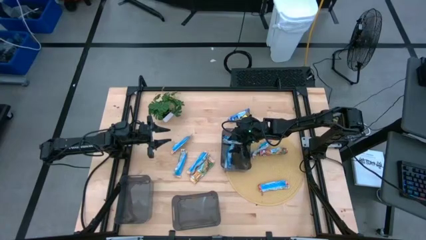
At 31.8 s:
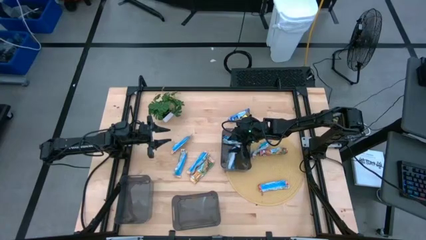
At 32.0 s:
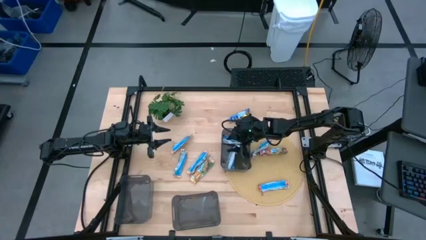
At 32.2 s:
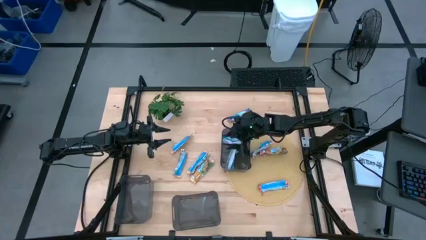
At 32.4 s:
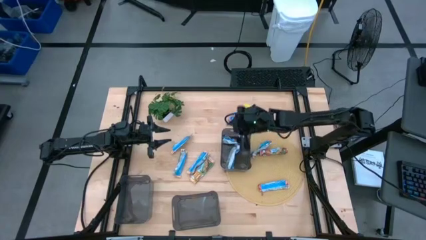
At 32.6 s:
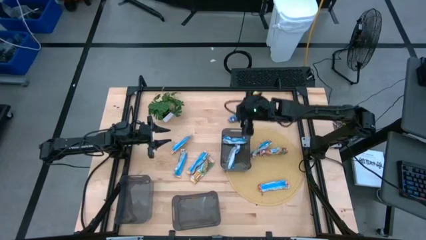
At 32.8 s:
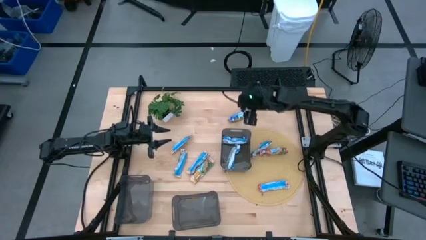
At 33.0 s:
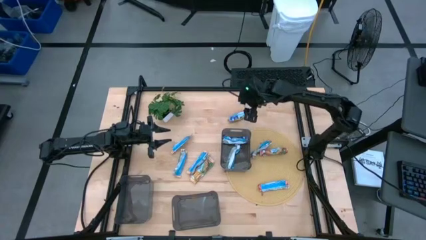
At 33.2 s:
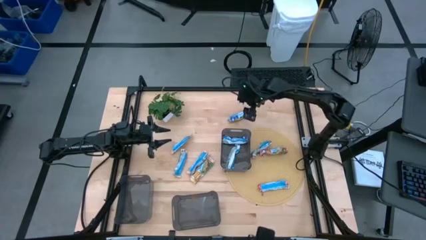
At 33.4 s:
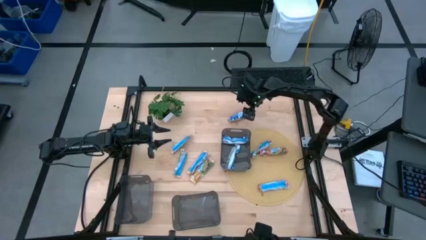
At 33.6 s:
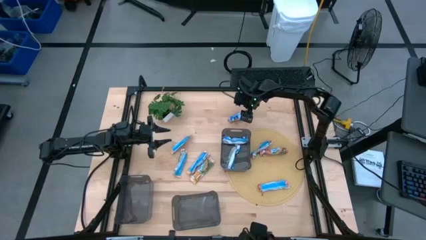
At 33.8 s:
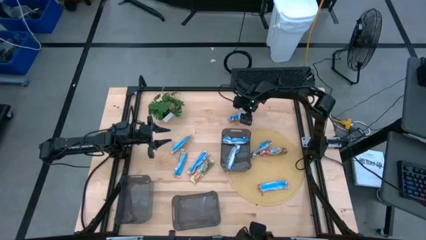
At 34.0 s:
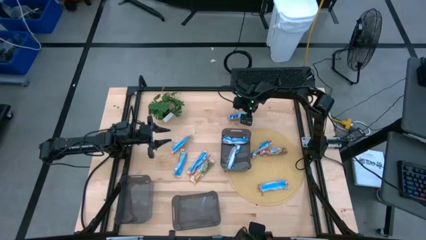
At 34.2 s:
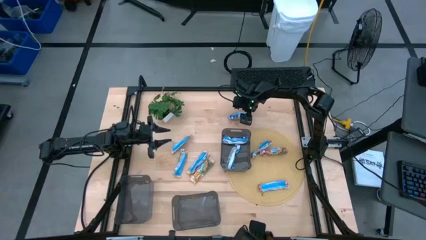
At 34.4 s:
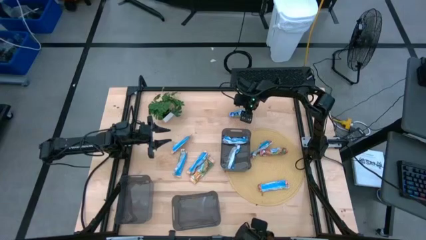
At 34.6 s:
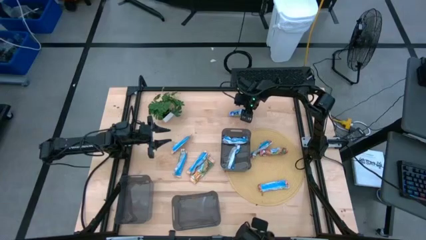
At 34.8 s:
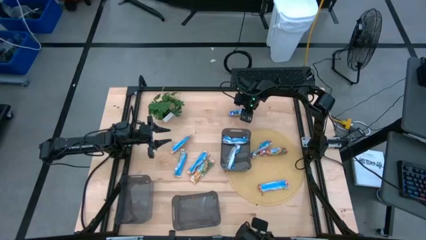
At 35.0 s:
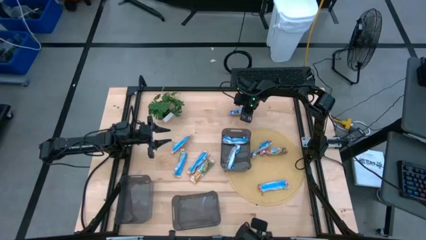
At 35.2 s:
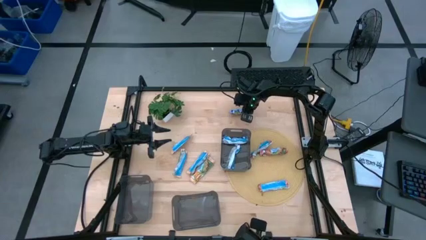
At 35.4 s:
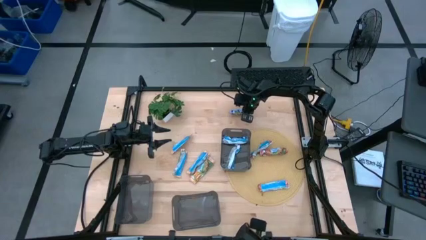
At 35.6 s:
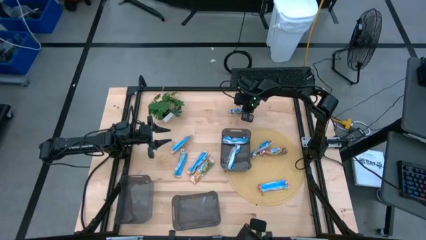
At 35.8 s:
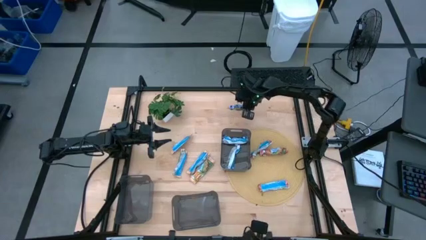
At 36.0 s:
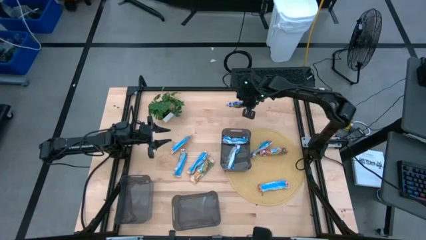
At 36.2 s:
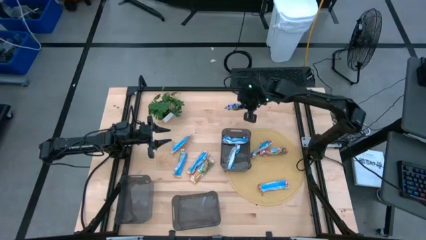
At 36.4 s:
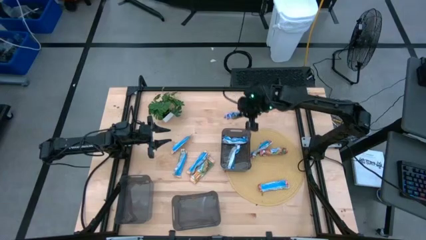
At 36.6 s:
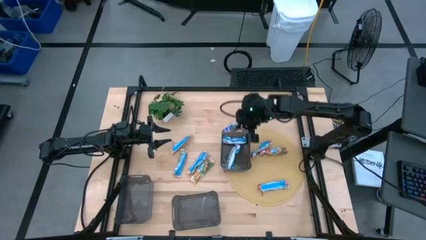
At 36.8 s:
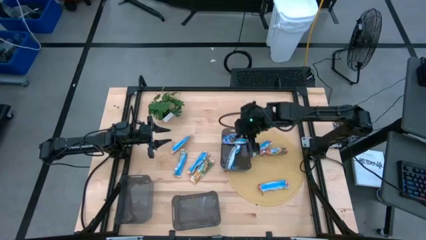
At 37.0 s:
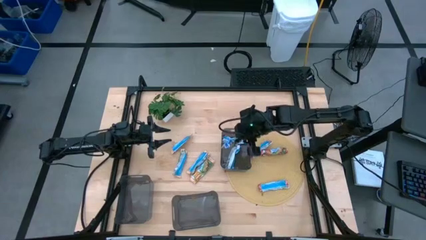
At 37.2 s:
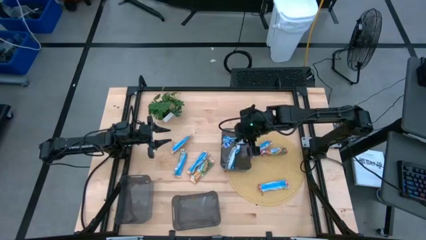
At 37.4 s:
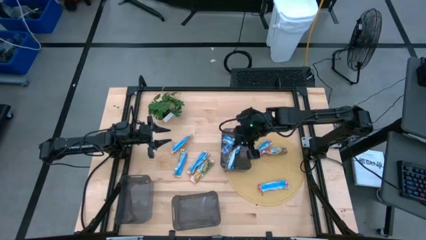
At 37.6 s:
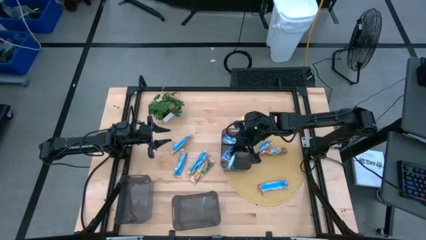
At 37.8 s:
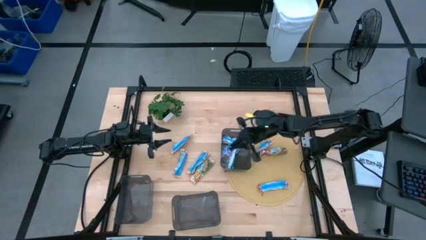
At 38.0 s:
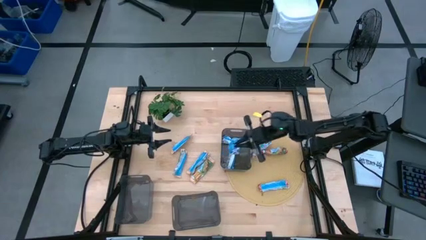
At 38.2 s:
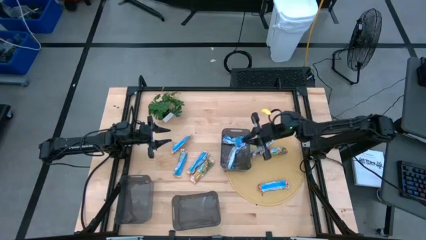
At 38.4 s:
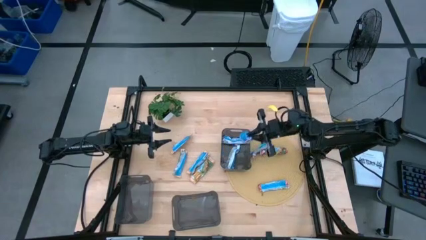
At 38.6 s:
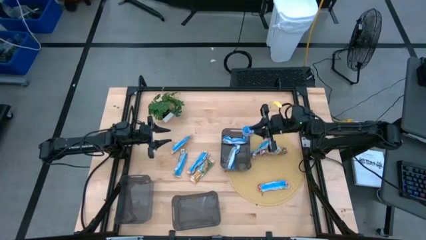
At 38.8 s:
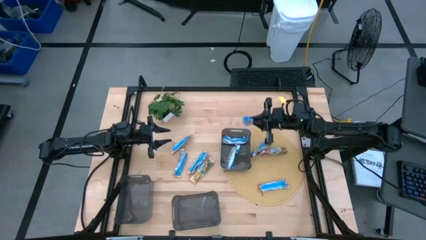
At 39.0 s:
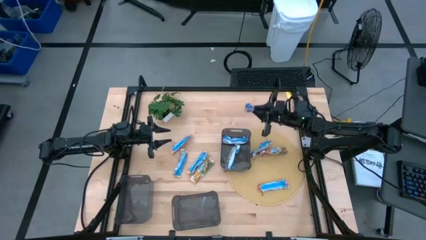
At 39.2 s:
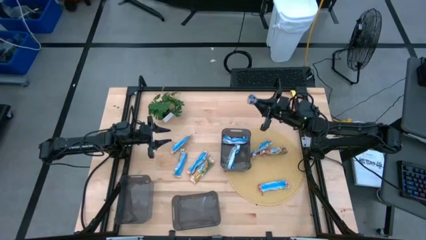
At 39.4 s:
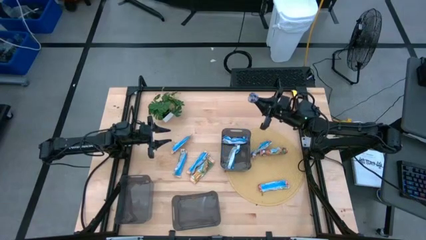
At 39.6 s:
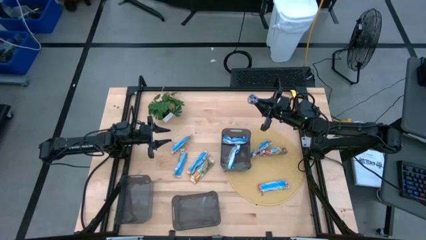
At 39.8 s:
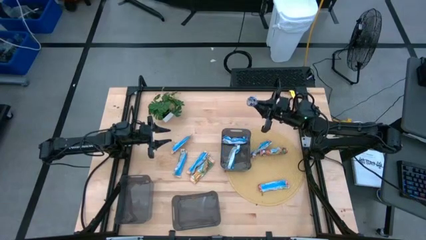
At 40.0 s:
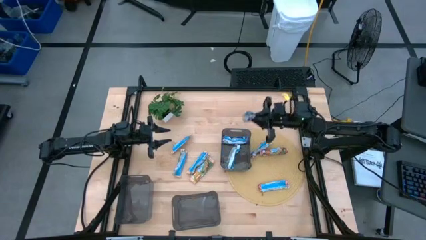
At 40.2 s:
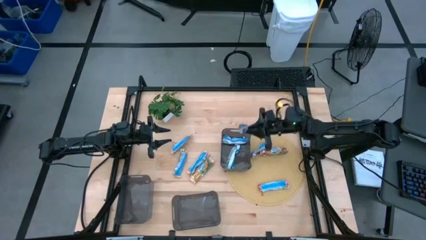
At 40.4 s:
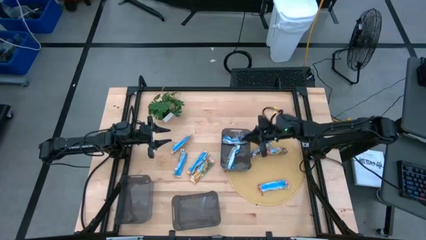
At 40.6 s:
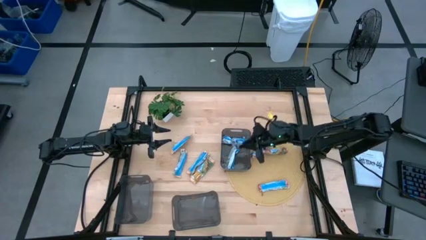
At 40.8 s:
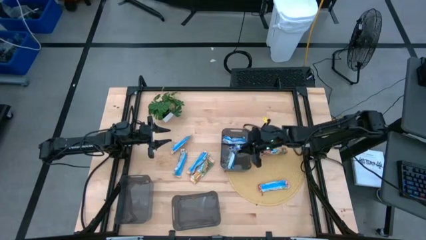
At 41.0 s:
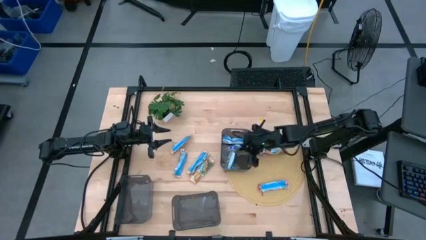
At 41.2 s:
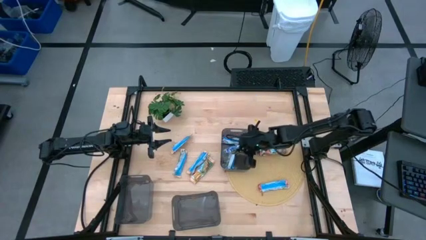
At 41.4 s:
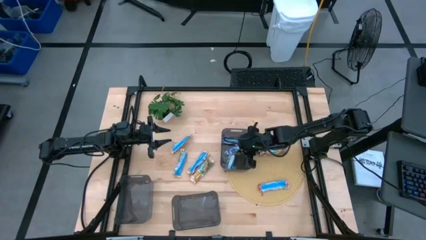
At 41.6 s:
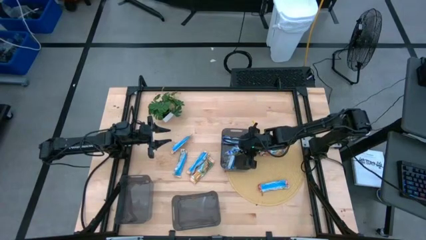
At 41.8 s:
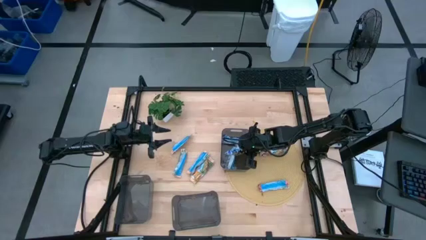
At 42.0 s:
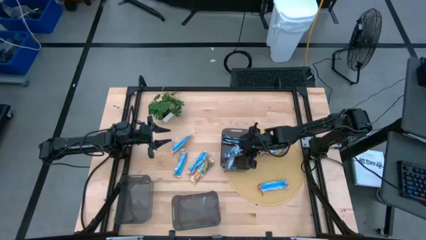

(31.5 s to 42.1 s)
Task: Pick and place Granola Bars by type
Put the blue granola bar into the top right black bin
